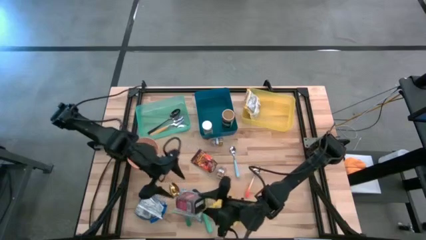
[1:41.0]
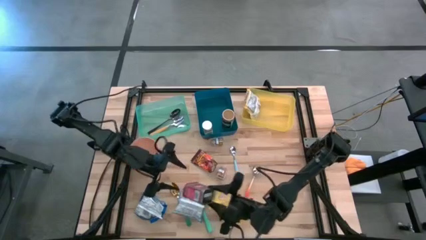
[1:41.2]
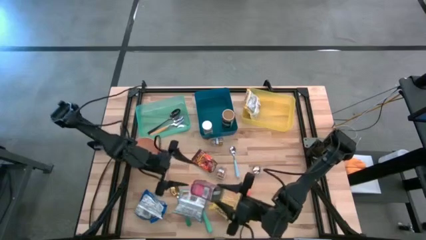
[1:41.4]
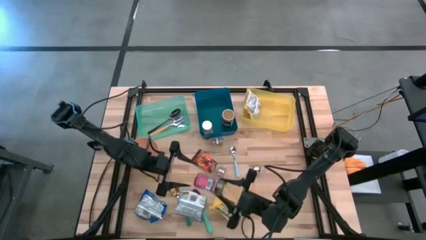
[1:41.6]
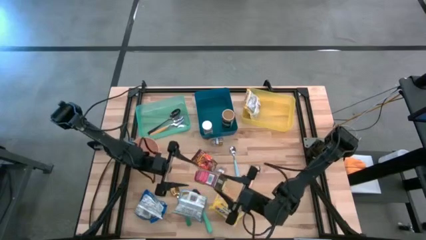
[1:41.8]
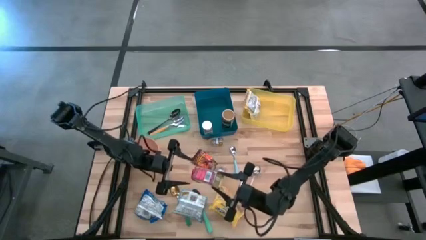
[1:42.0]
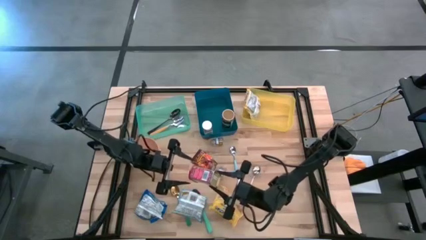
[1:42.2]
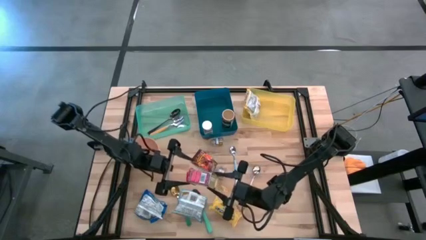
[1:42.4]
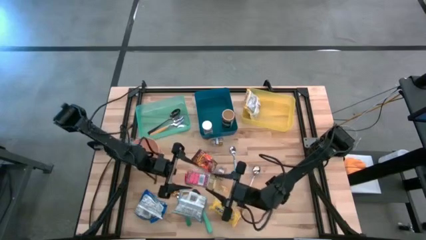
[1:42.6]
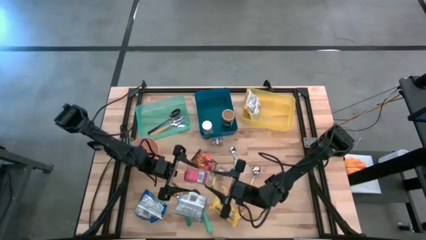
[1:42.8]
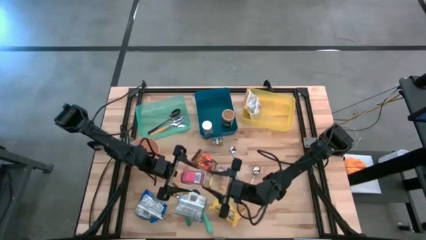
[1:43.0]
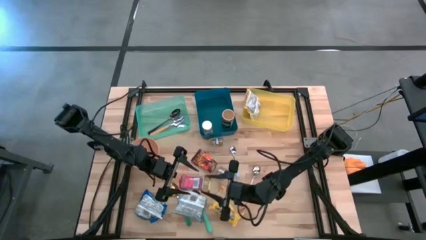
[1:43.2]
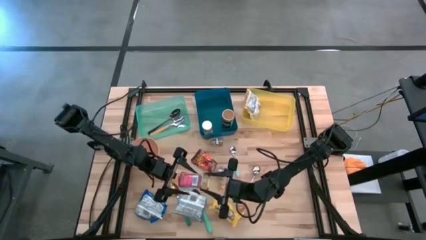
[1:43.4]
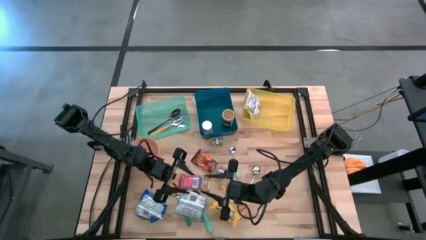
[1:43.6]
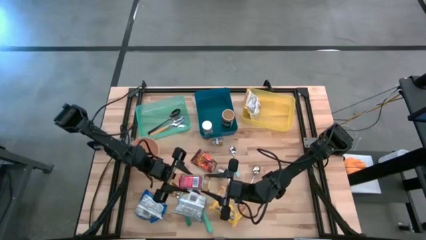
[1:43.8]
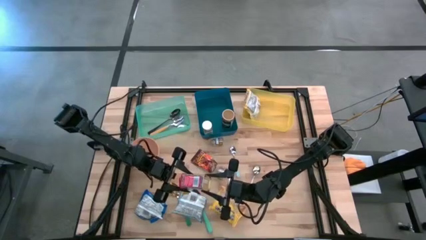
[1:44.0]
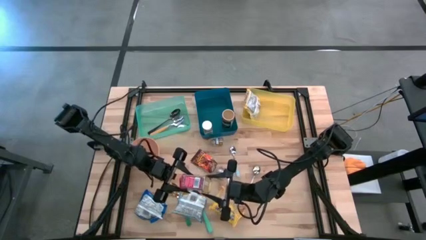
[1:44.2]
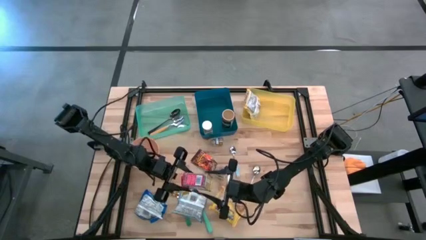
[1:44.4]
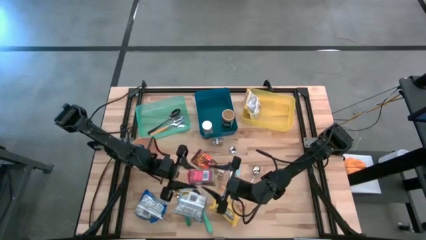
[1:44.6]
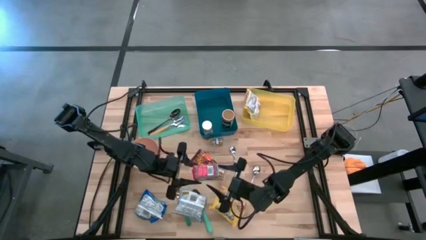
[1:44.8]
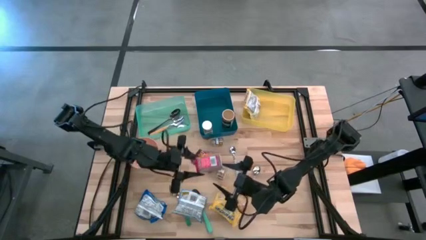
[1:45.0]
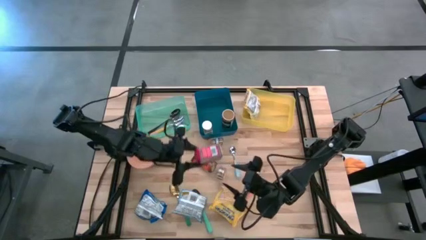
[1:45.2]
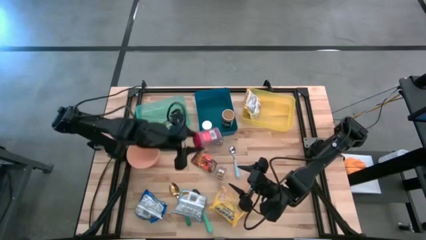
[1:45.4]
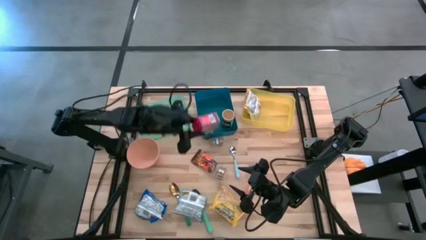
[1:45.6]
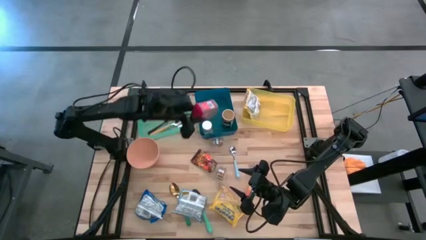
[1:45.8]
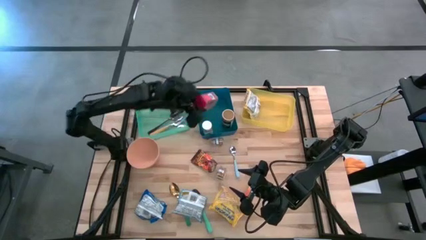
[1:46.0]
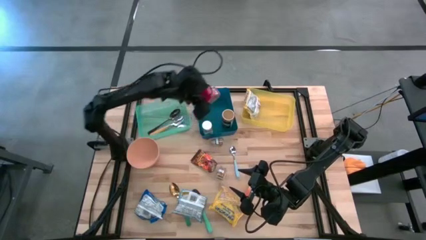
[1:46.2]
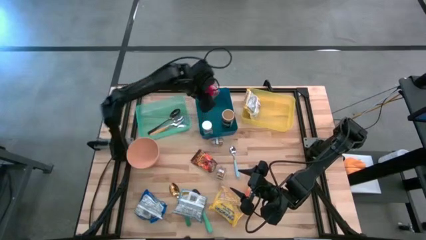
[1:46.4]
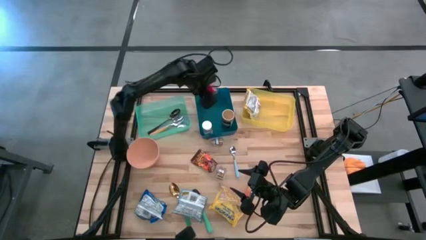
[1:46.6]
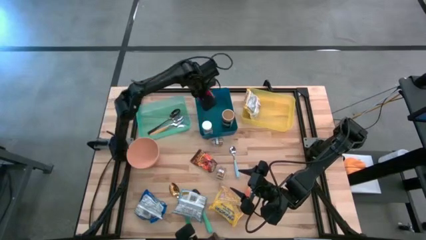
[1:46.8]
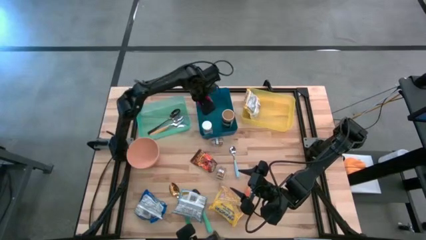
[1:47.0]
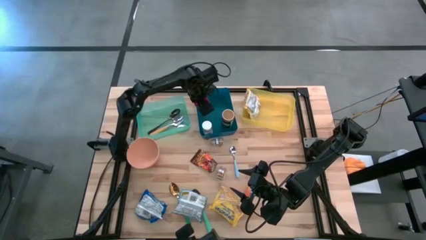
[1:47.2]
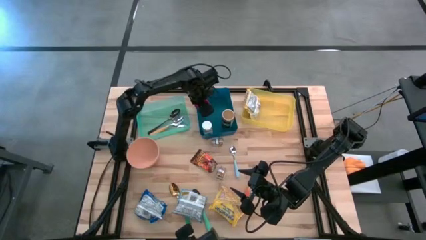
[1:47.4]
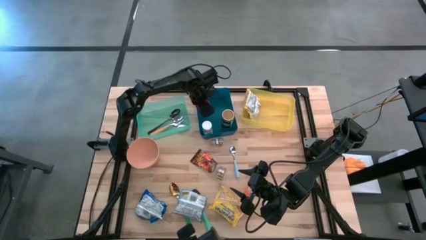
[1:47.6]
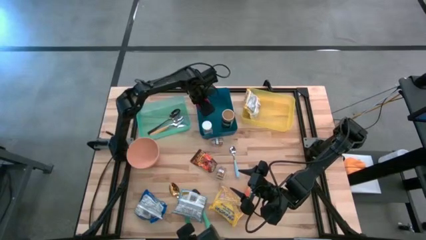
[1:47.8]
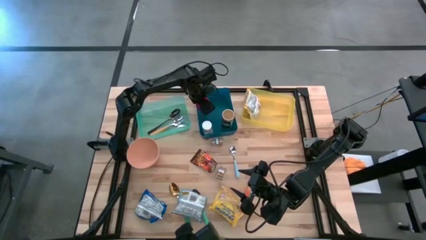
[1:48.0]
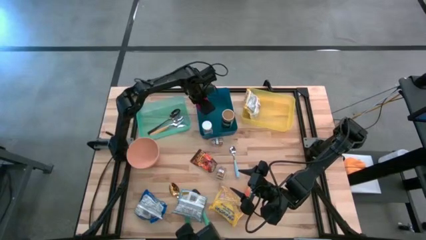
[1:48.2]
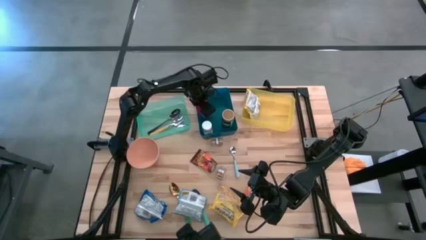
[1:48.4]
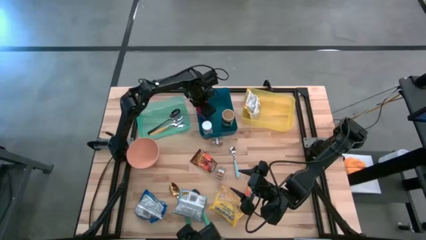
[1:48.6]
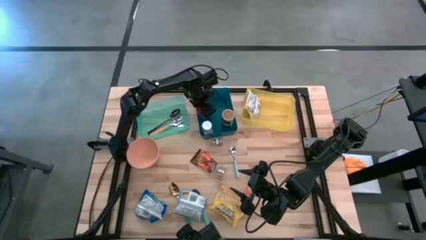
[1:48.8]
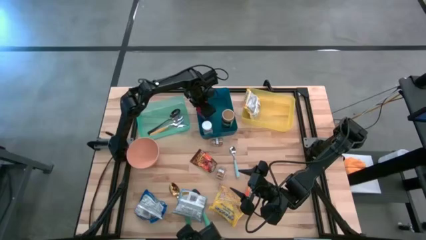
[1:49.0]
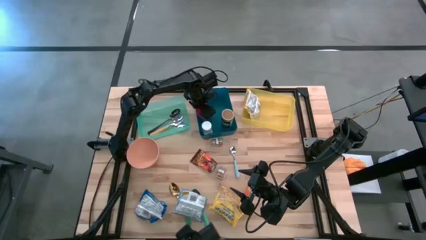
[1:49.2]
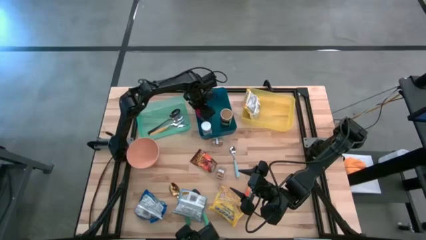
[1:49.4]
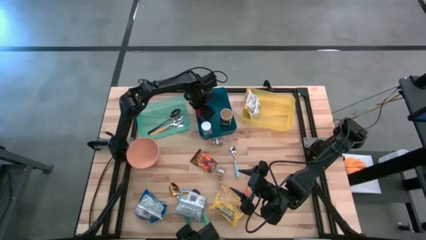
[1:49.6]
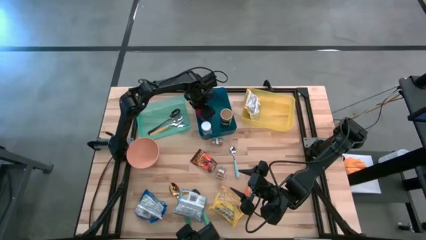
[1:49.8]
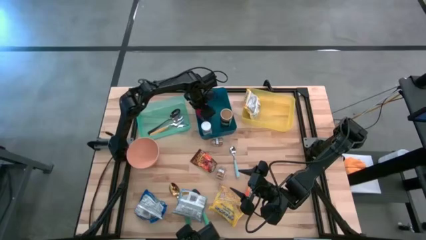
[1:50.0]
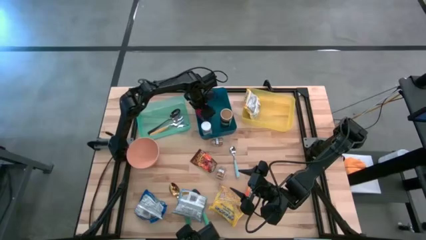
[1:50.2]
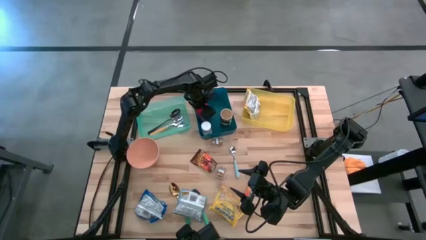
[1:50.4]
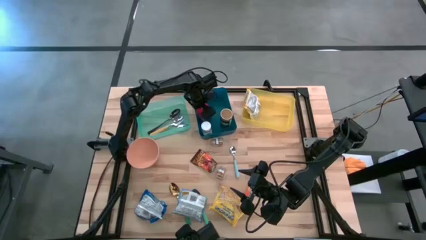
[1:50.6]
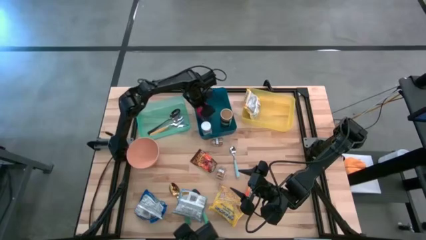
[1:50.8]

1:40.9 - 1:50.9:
Put the red seasoning can into the blue bin
